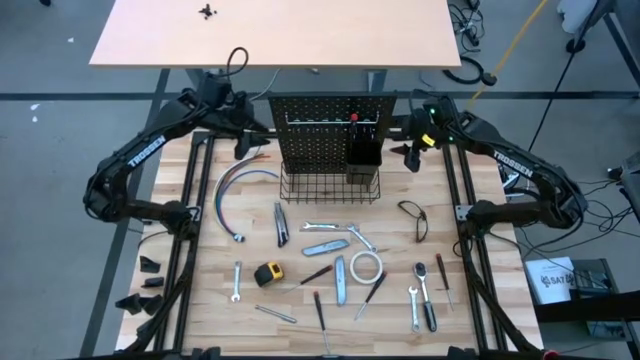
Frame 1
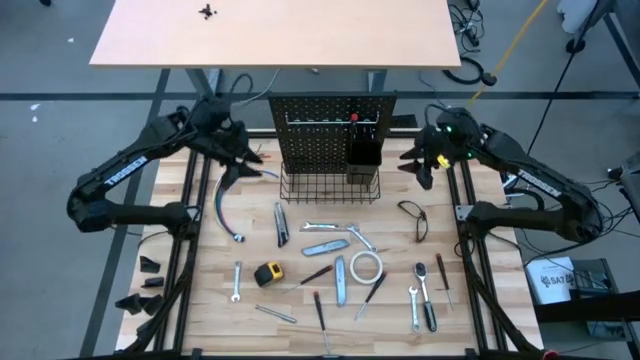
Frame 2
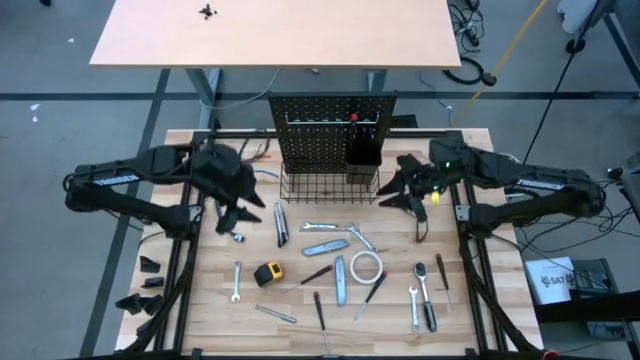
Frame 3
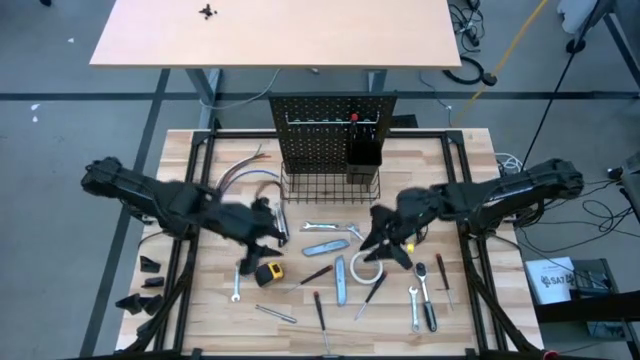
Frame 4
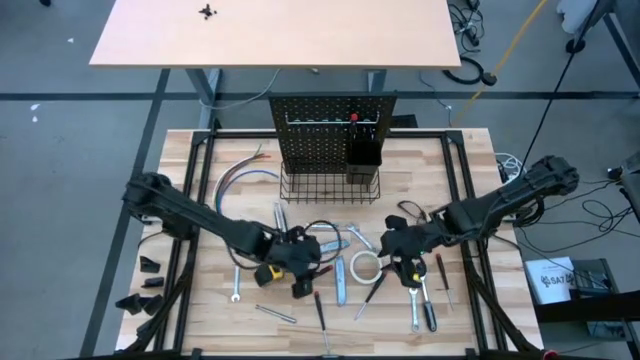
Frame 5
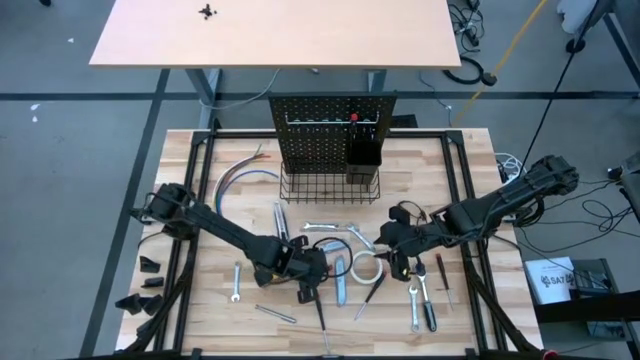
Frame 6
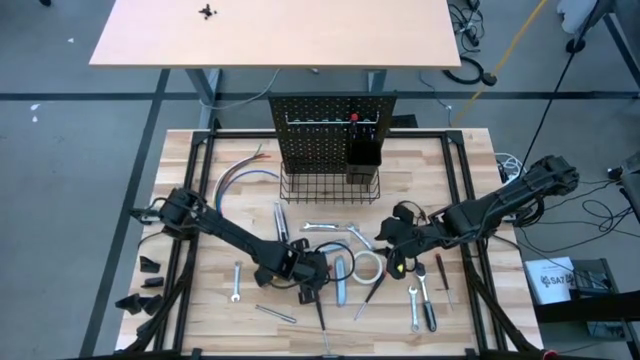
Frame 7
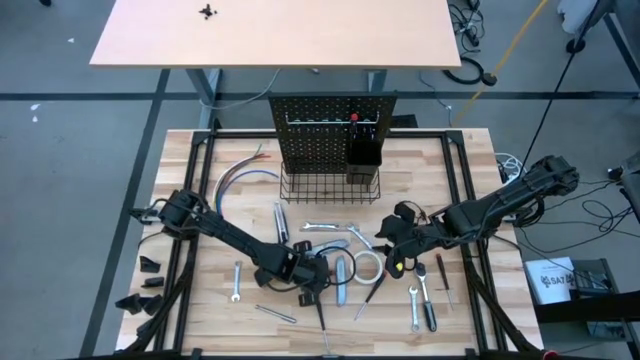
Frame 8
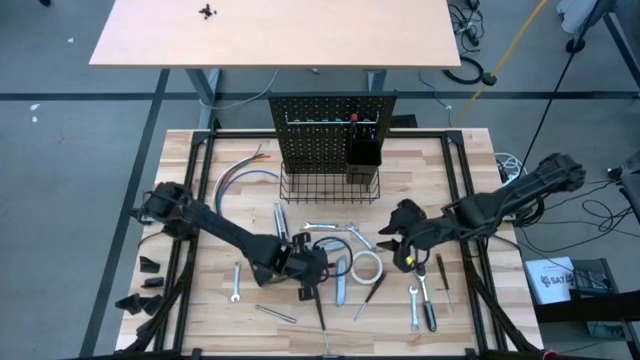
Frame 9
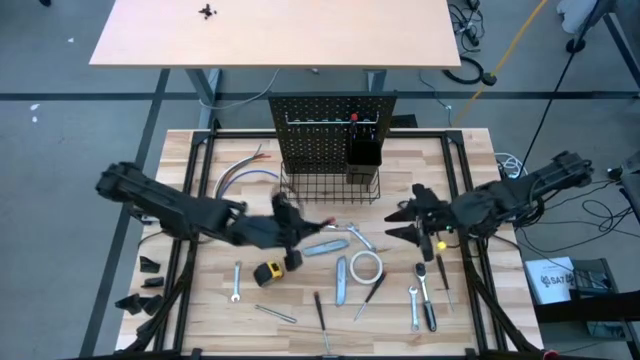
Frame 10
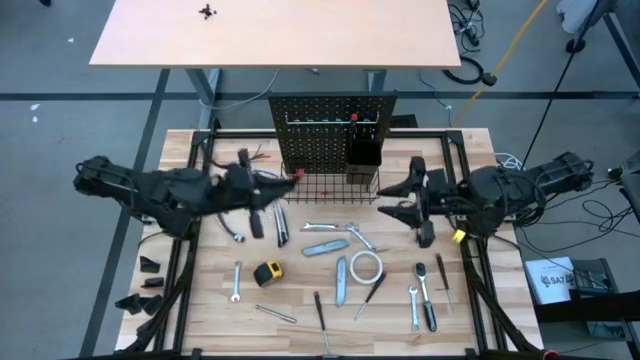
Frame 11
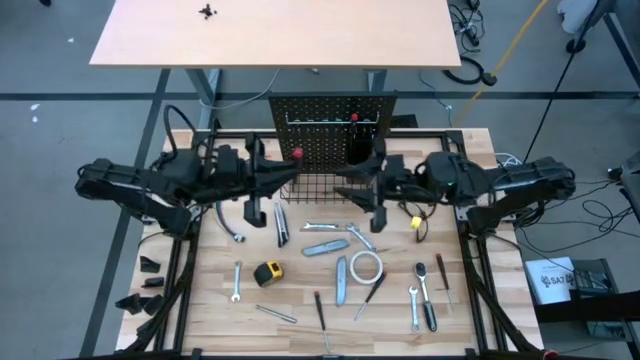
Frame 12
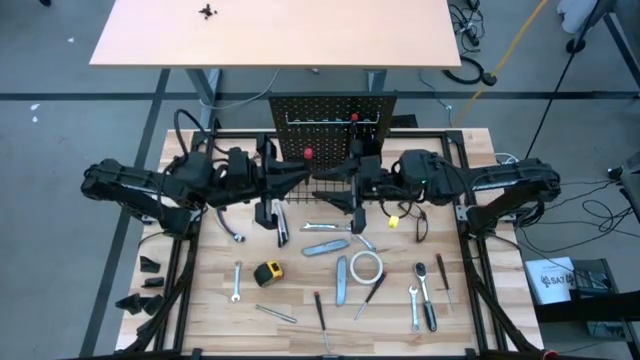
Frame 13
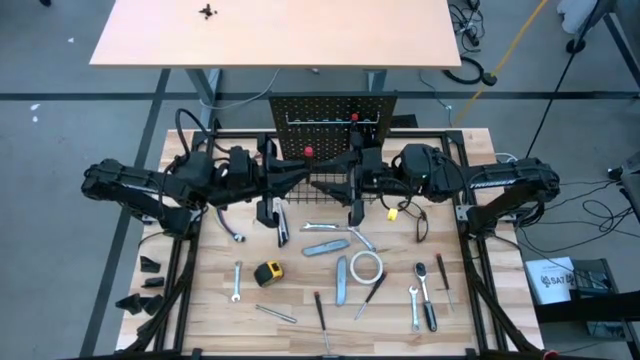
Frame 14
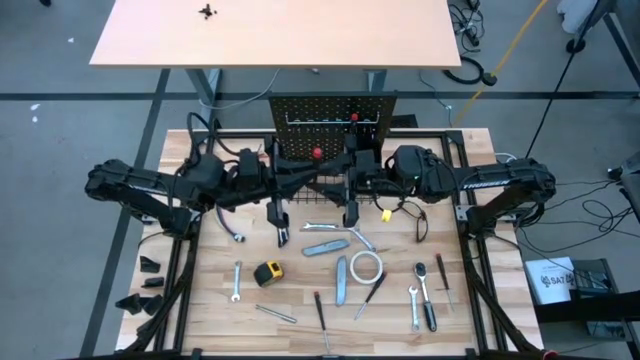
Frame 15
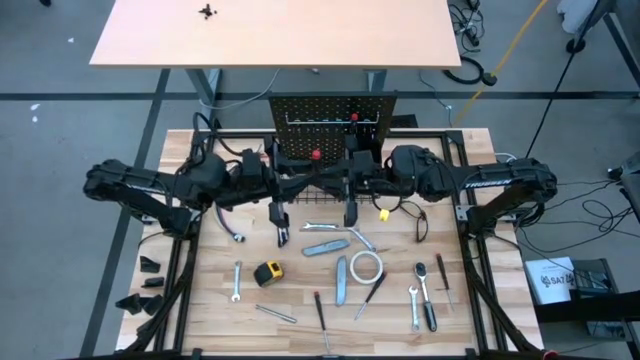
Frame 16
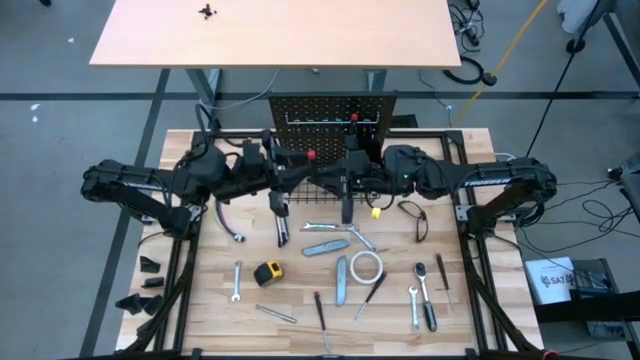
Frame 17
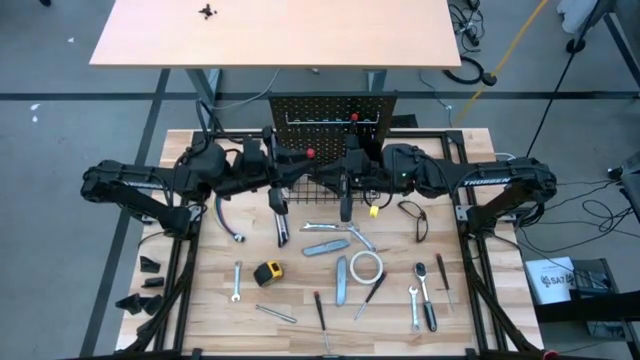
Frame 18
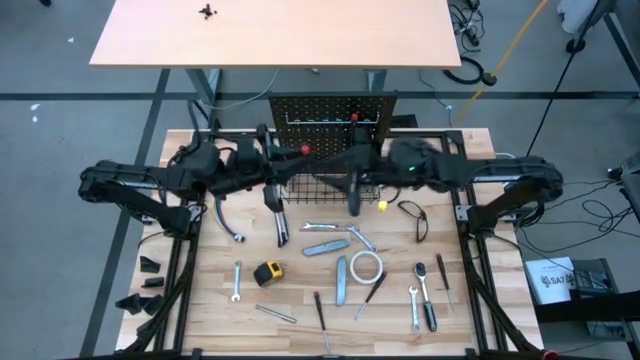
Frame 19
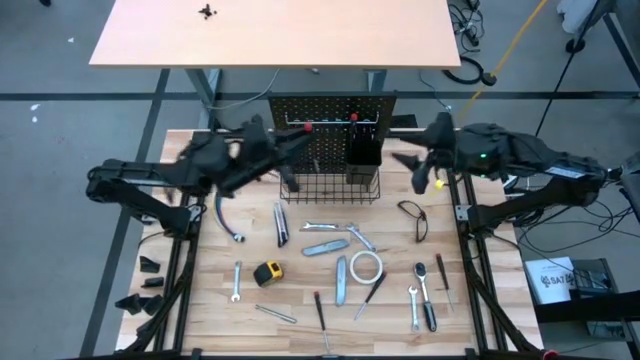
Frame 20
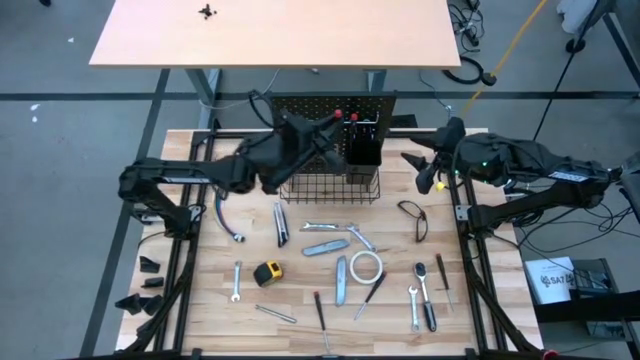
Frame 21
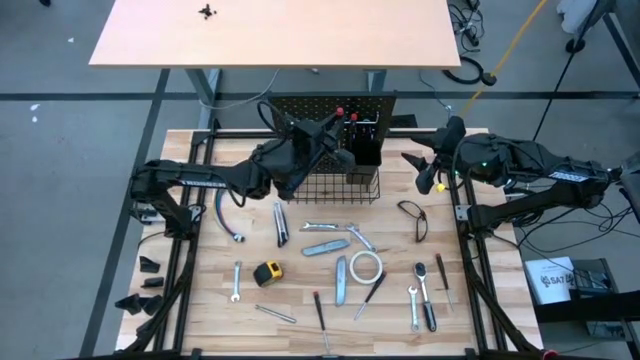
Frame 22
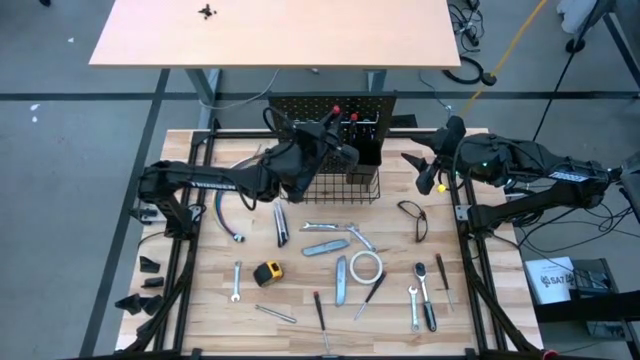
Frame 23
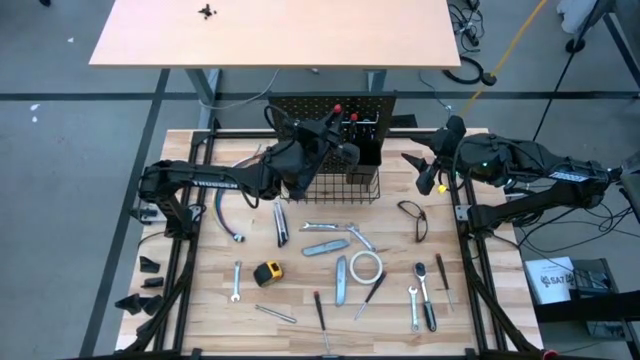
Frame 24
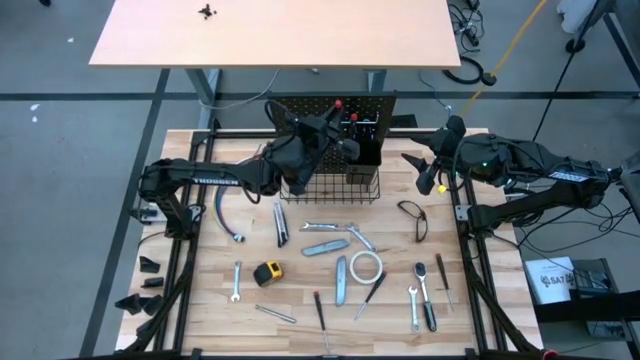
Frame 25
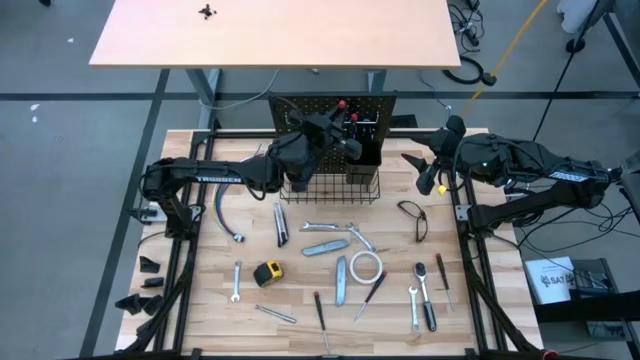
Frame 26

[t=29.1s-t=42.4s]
Task: Hang tools onto peg board
Hang the nut driver onto the pegboard

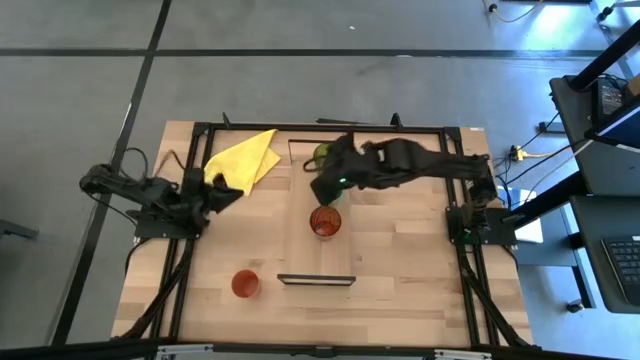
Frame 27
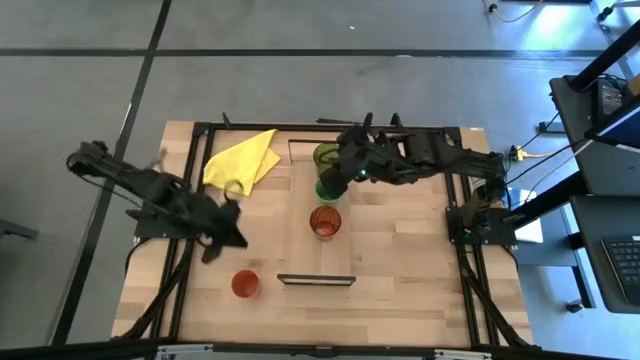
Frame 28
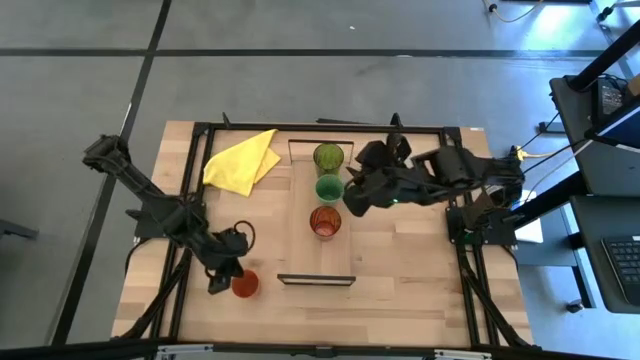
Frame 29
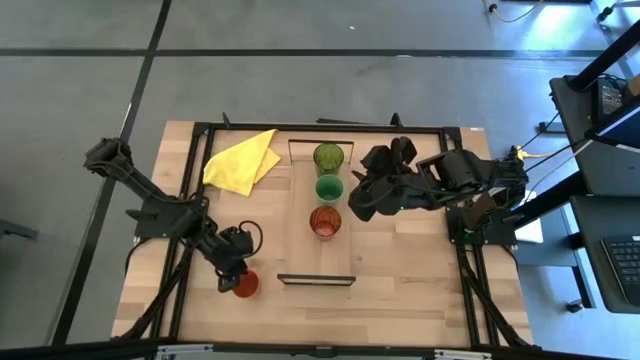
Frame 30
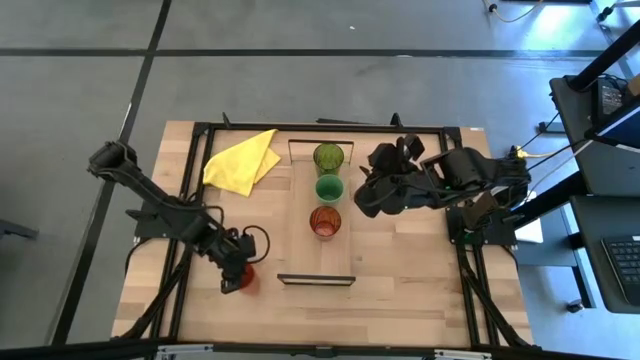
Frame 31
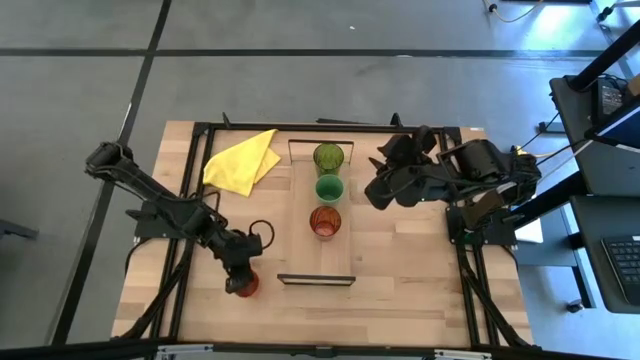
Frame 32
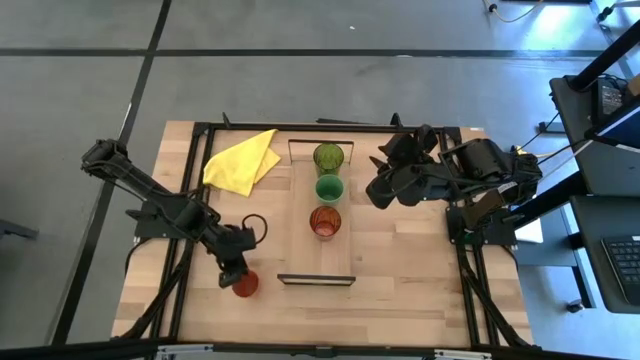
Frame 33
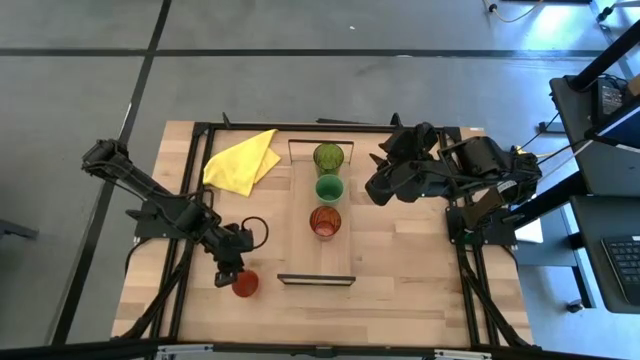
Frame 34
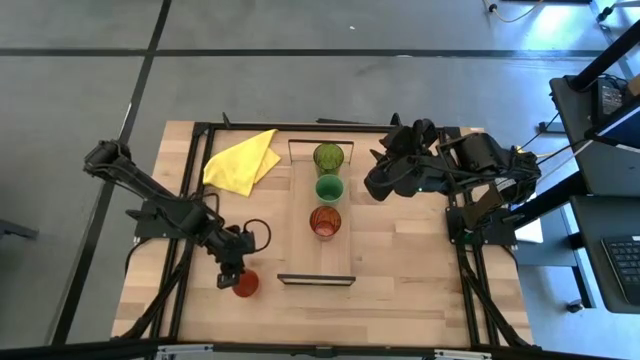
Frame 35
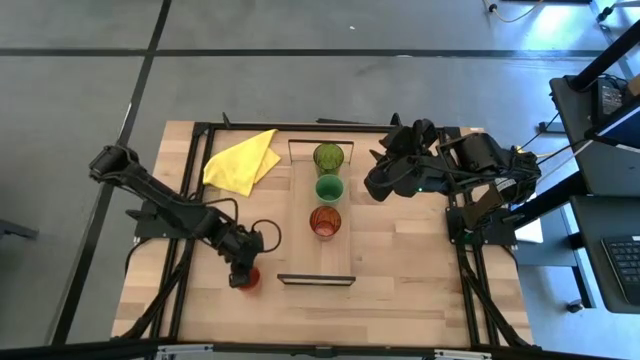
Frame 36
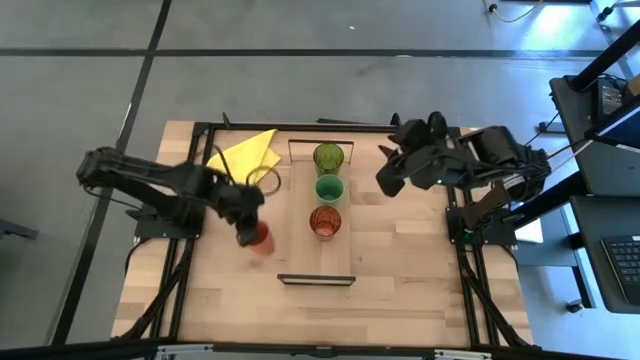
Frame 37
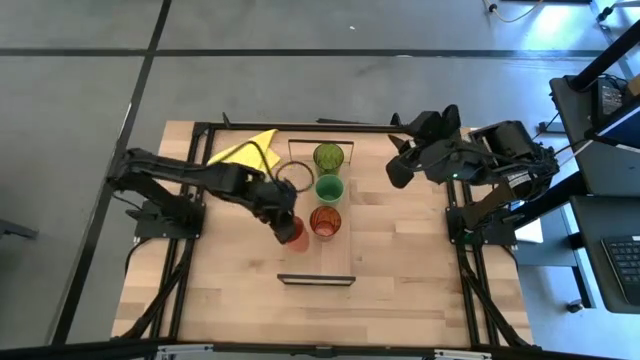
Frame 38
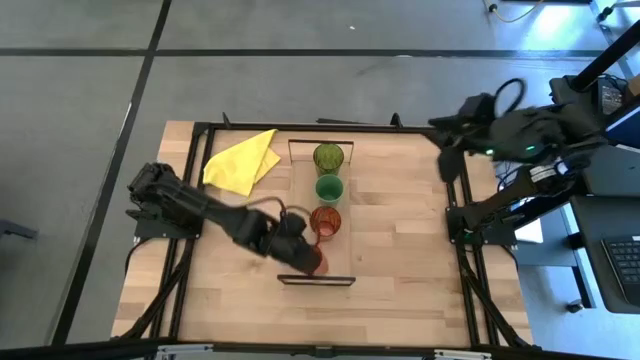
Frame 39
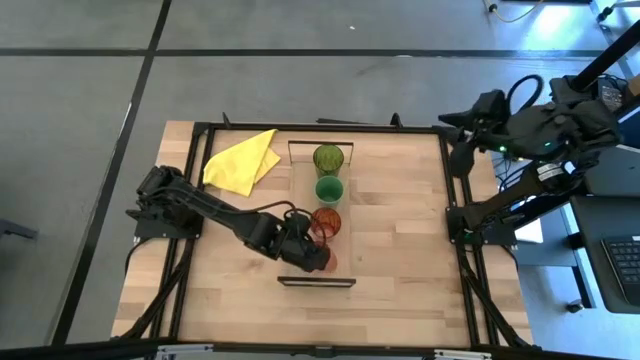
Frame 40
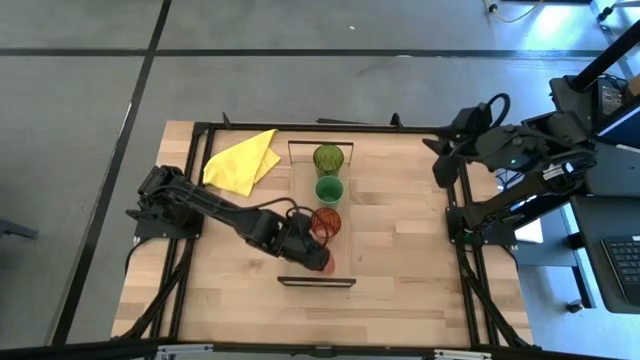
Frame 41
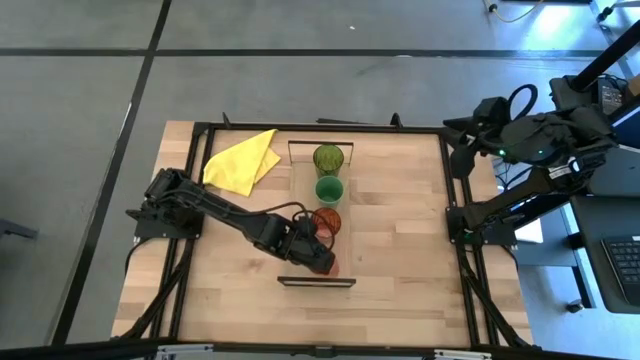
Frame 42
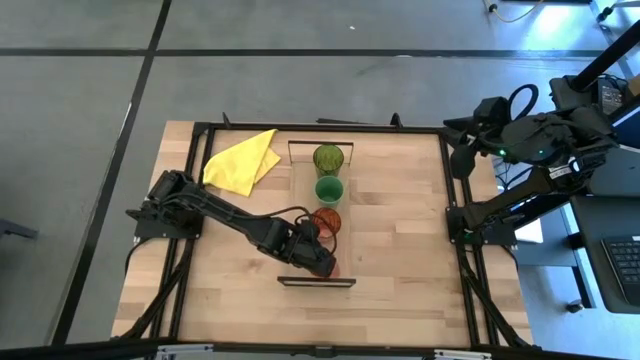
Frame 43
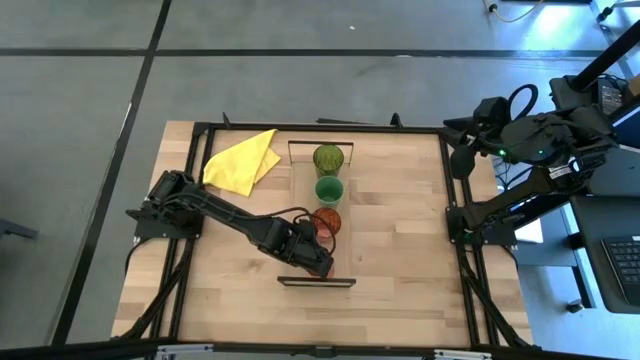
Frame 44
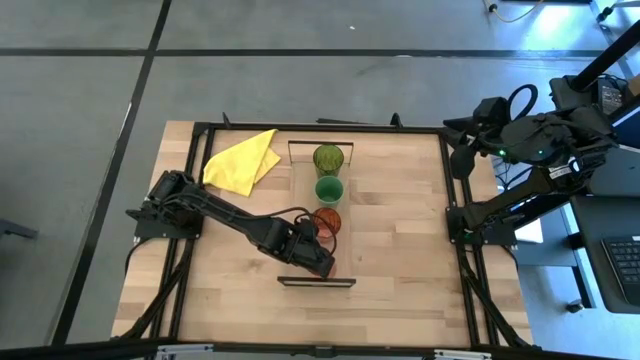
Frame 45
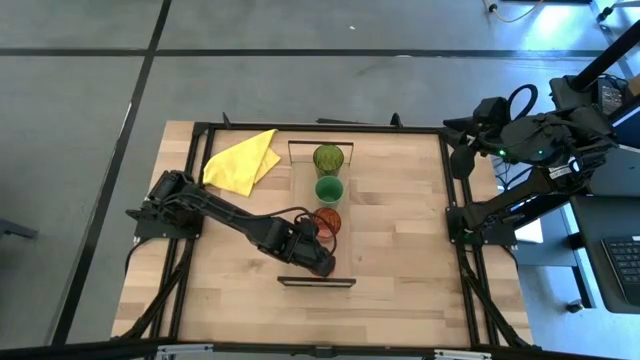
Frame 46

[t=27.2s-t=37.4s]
Task: Stack small to large cups/mugs on shelf
Put the light orange cup on the shelf
